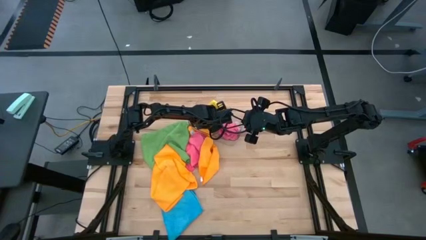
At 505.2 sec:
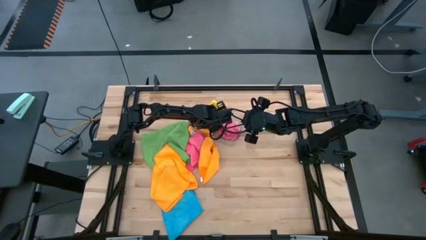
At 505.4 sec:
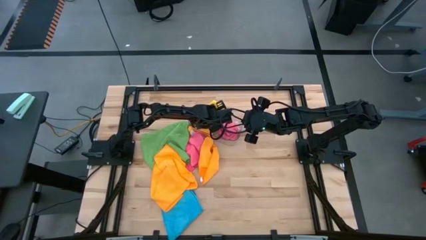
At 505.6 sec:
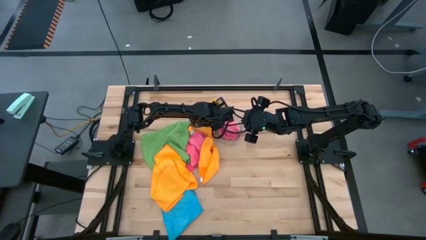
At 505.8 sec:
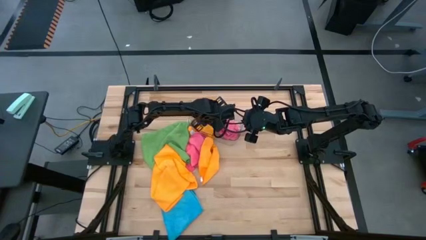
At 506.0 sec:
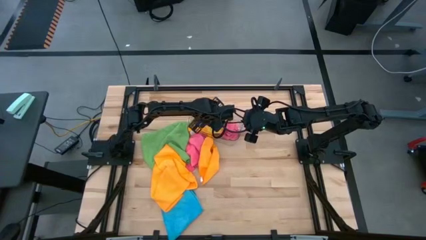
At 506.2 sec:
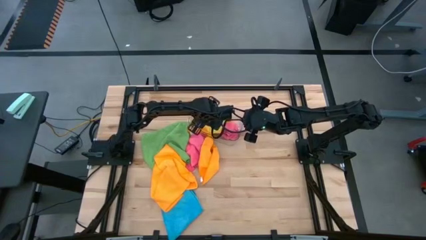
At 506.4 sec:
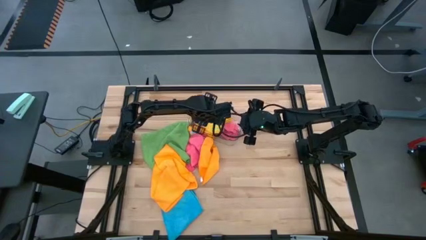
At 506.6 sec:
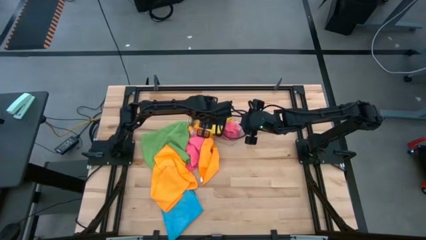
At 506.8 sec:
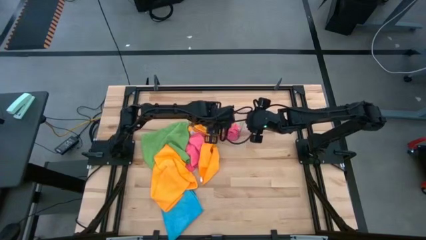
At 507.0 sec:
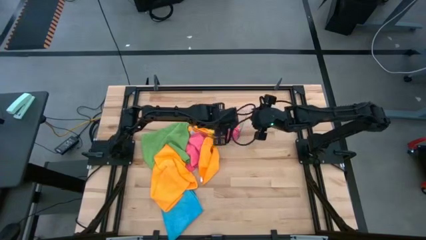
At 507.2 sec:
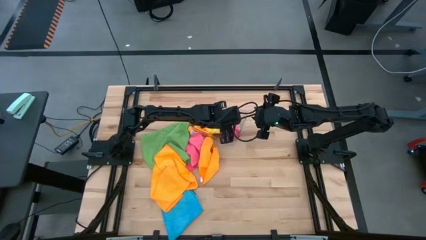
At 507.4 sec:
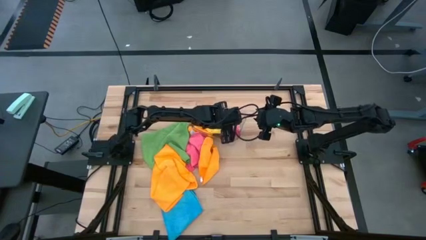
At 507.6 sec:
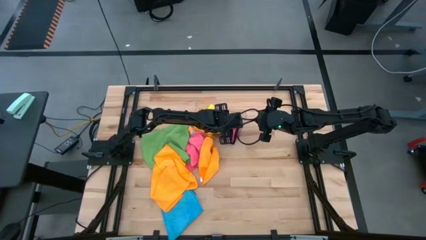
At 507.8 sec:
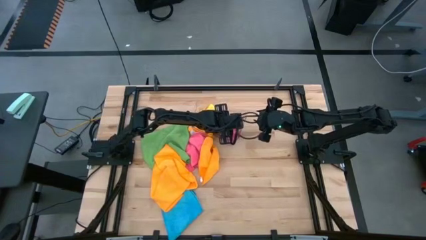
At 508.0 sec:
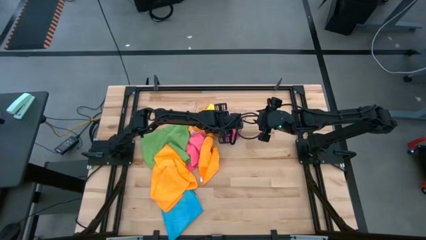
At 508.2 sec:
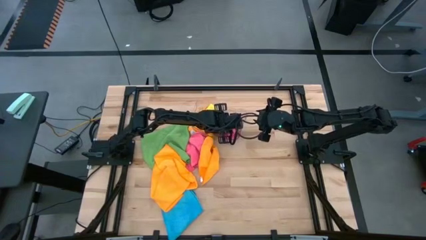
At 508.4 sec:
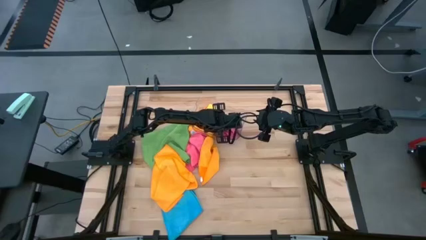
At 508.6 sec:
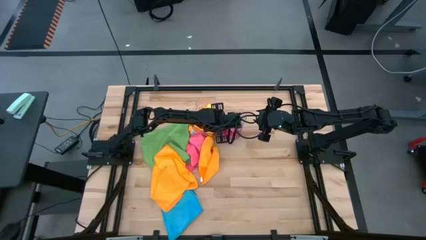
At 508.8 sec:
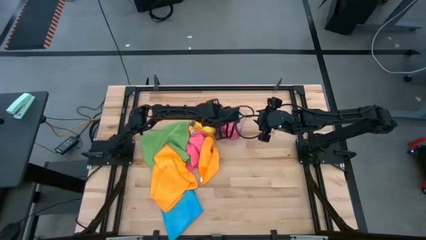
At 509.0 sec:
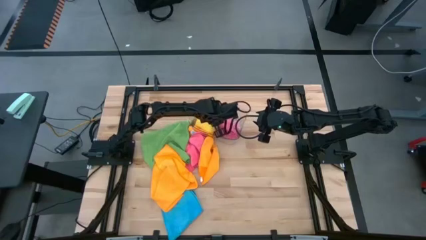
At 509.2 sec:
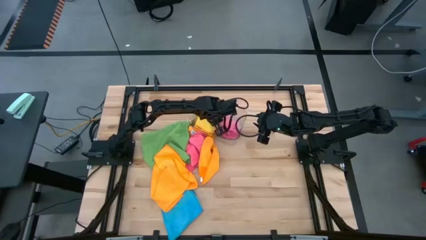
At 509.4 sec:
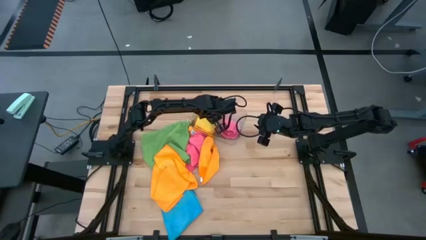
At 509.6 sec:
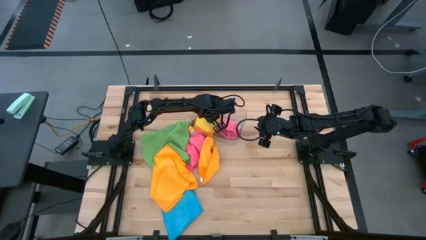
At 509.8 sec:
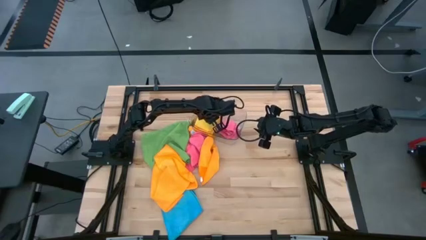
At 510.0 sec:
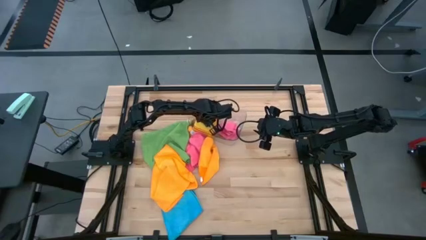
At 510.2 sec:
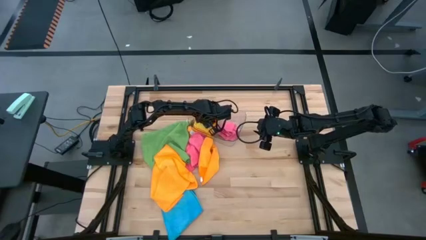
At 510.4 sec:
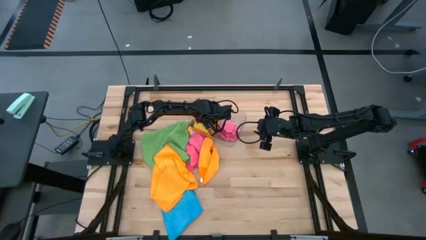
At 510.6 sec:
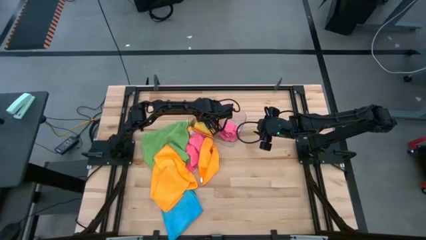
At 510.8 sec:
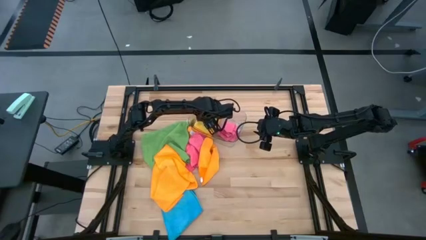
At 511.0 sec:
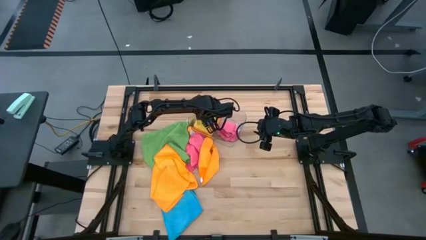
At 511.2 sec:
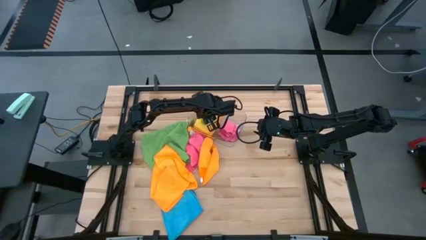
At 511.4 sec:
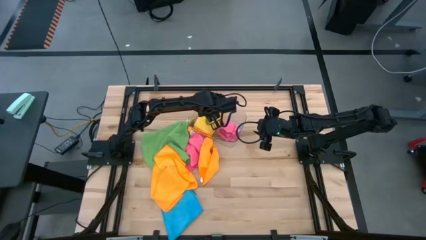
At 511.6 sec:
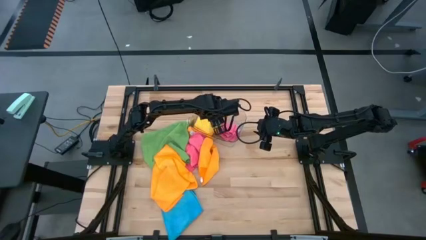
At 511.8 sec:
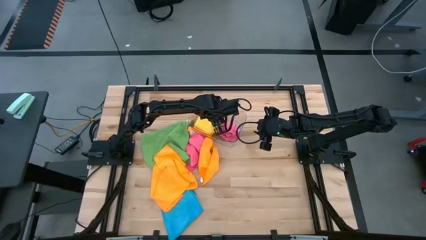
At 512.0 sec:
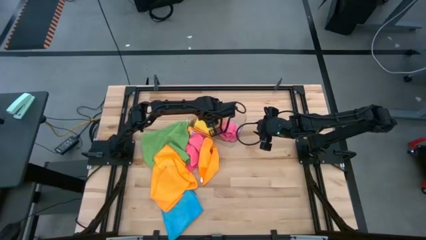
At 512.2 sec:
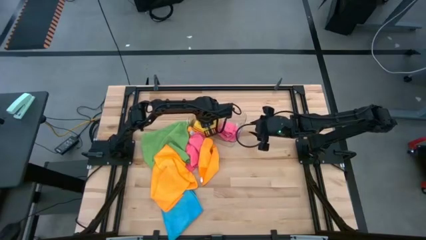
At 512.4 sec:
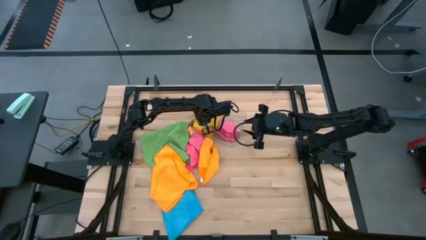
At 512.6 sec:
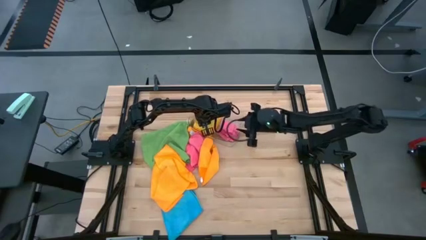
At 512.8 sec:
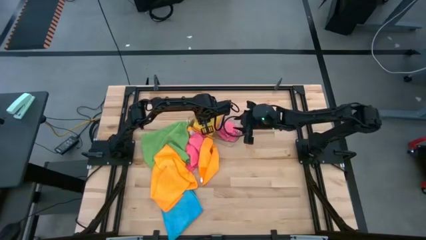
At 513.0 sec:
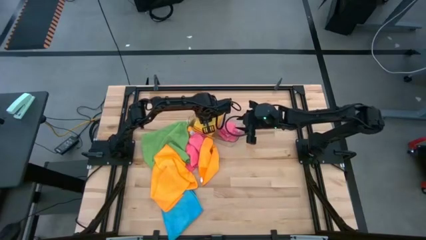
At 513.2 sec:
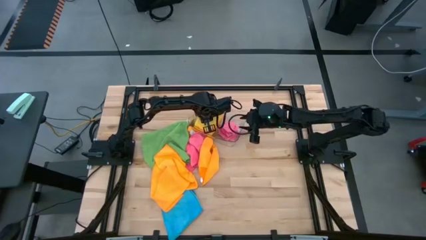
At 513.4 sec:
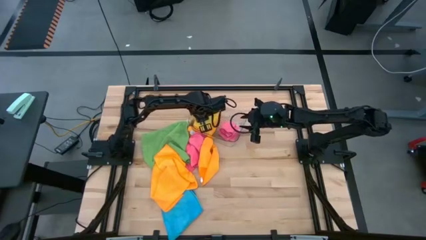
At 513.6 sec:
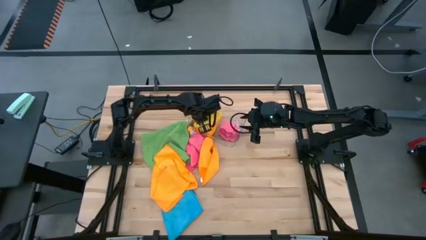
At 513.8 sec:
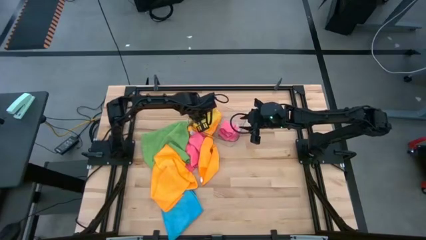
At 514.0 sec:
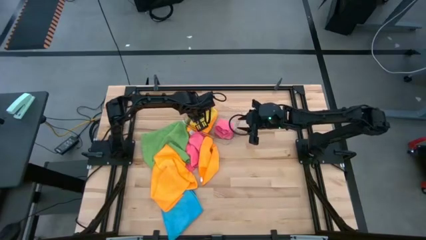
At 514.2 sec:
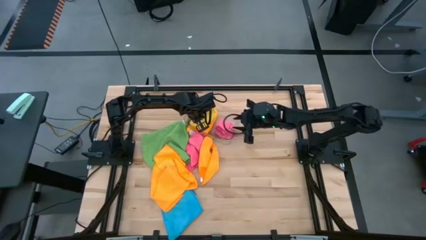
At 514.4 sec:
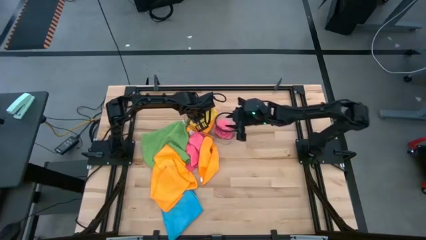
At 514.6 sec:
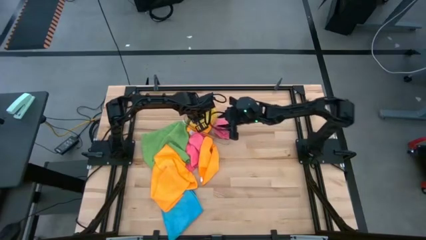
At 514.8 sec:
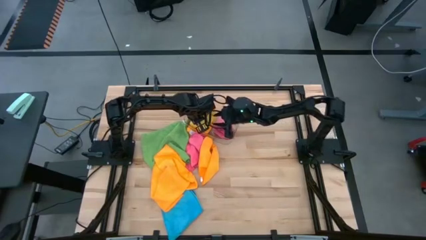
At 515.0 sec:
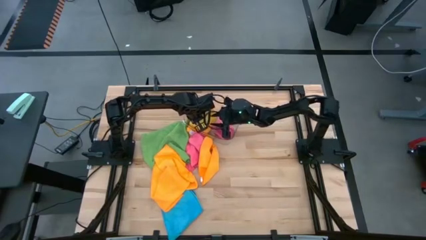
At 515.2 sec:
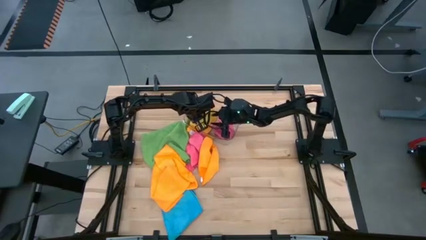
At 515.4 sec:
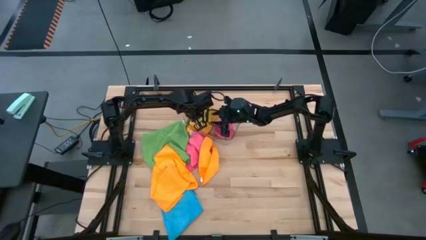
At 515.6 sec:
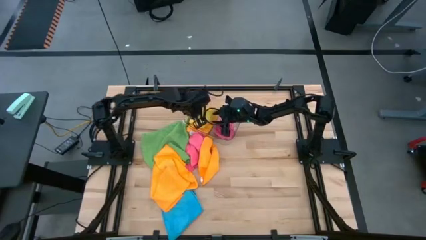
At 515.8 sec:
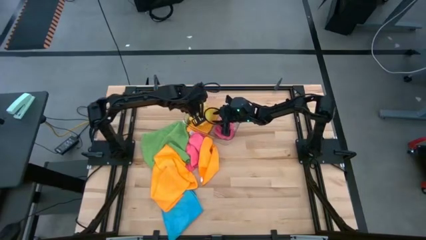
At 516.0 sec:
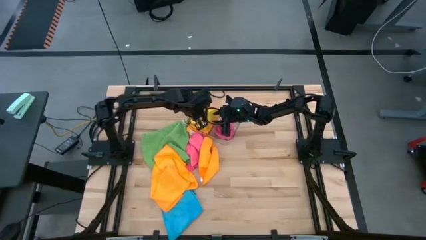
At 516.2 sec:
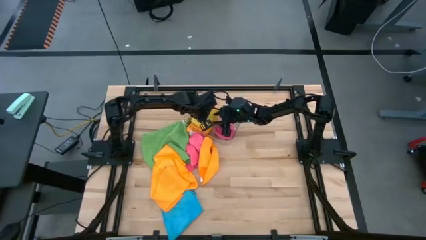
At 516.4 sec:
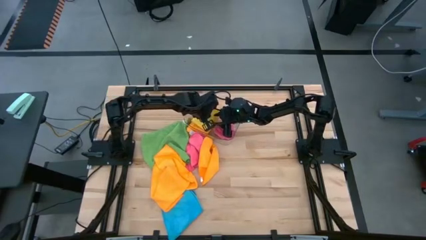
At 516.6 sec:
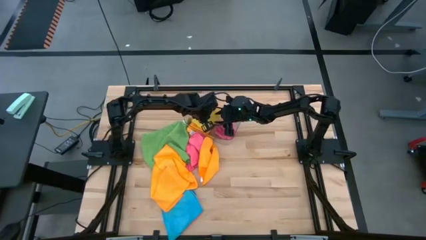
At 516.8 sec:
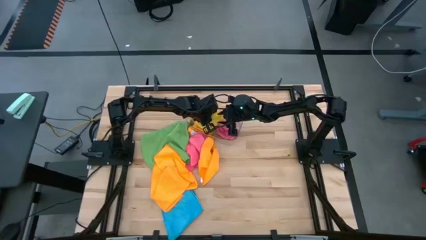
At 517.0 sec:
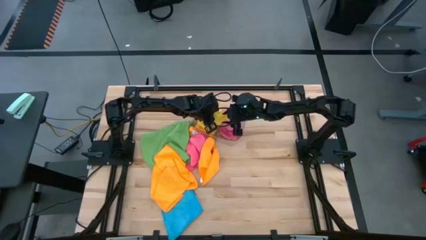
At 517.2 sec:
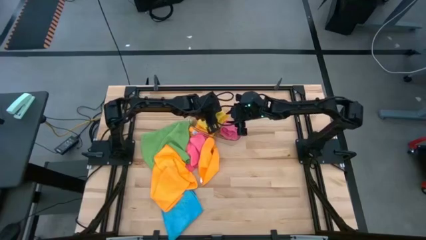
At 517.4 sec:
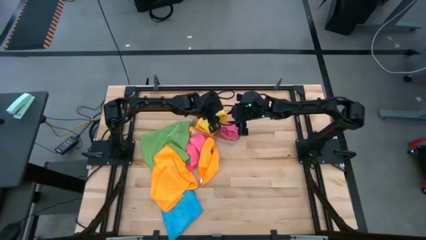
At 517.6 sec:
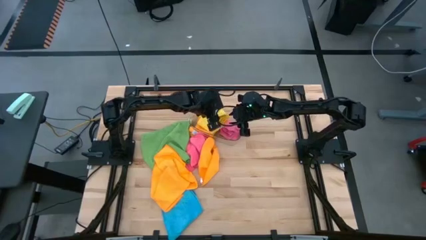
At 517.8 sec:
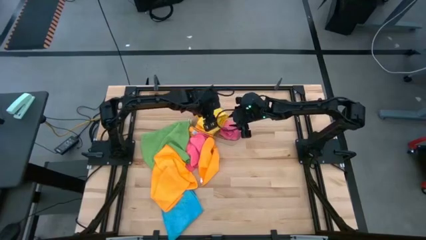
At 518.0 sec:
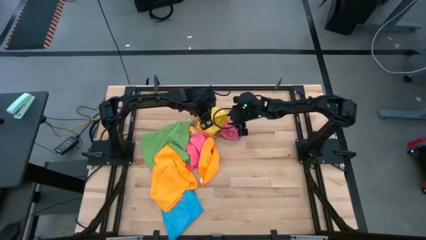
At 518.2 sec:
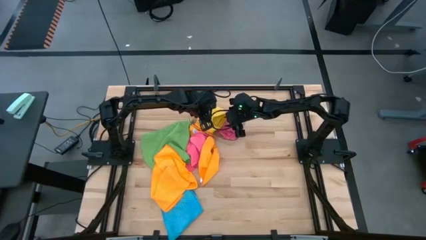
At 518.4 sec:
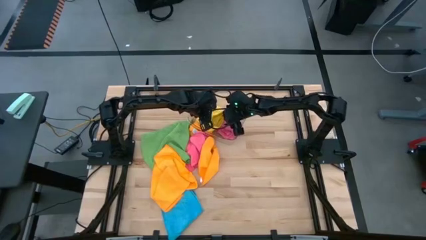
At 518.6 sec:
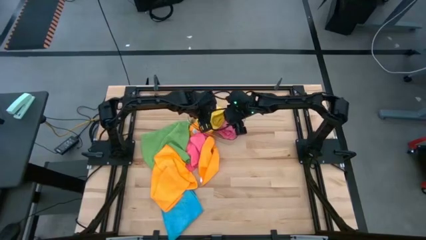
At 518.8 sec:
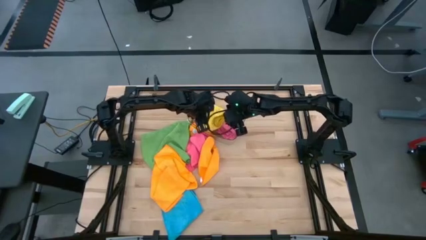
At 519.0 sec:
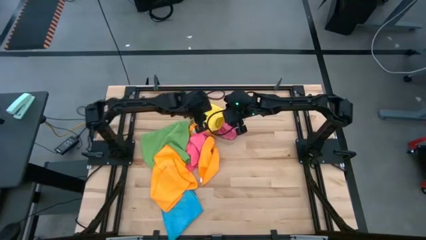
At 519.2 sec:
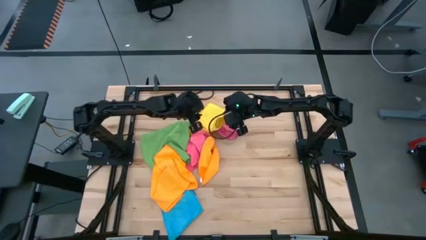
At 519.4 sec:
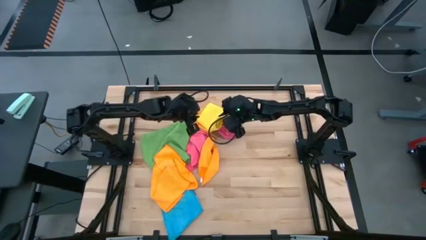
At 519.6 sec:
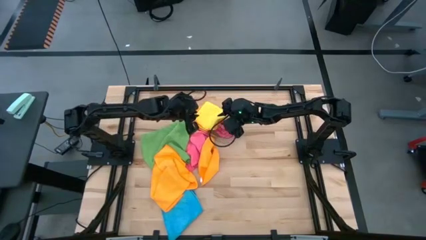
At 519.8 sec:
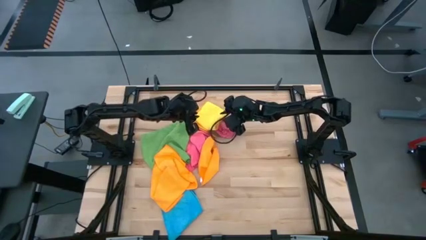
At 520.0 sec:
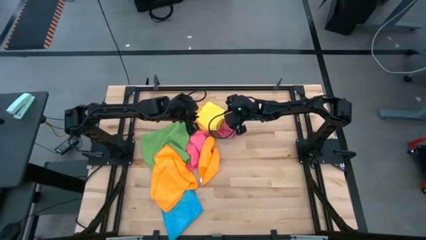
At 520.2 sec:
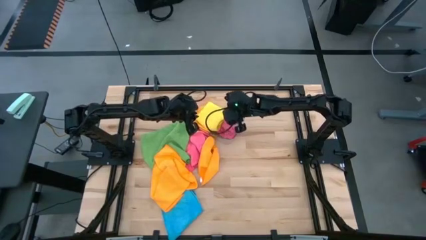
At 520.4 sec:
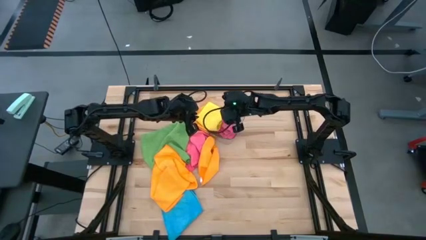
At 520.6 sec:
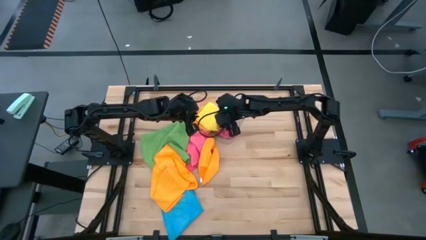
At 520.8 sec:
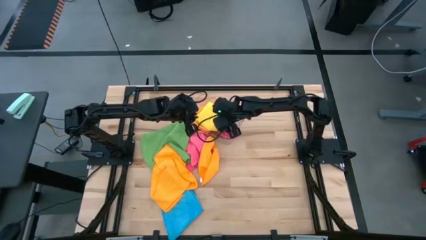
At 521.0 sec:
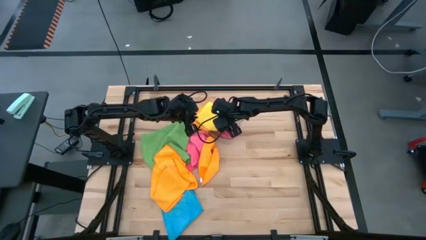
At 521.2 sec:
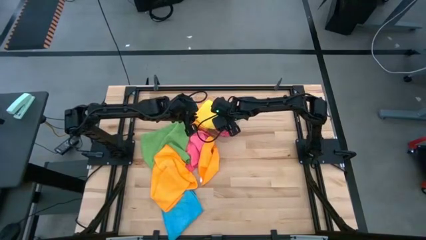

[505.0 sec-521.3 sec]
Task: Fold microfiber towels
Put the yellow microfiber cloth into the transparent bin
